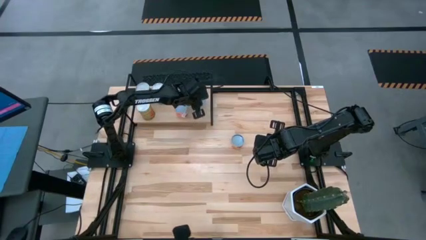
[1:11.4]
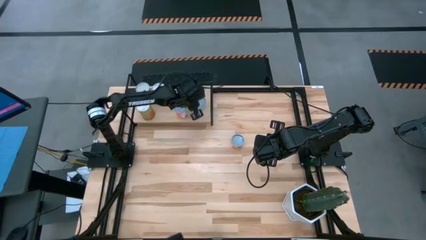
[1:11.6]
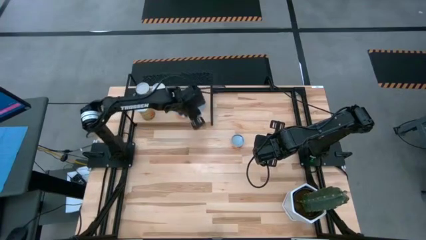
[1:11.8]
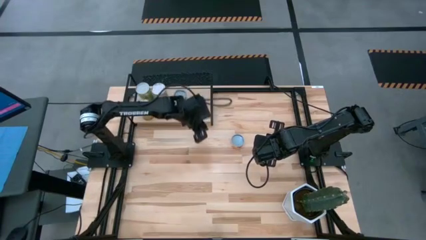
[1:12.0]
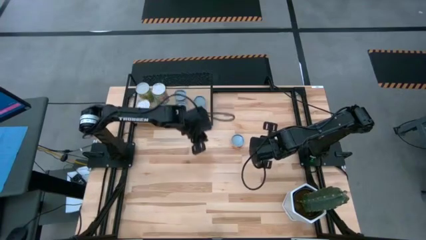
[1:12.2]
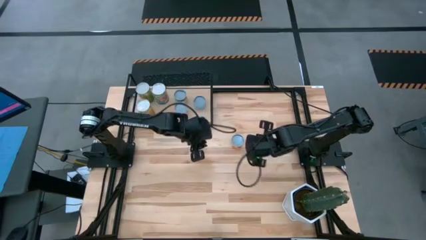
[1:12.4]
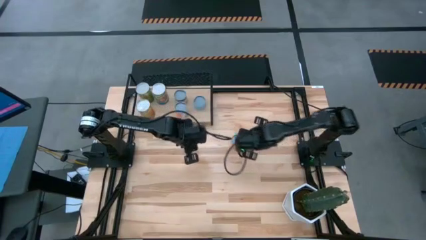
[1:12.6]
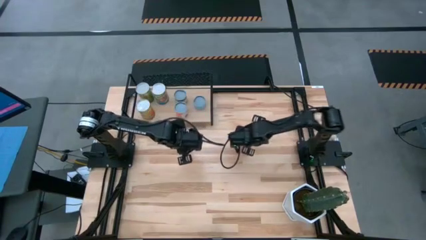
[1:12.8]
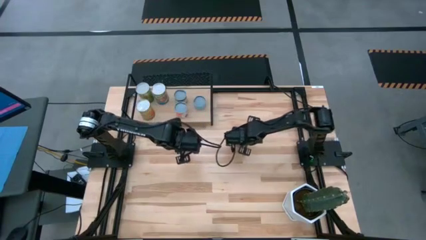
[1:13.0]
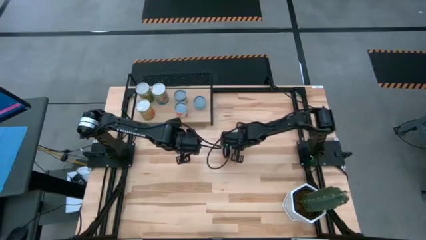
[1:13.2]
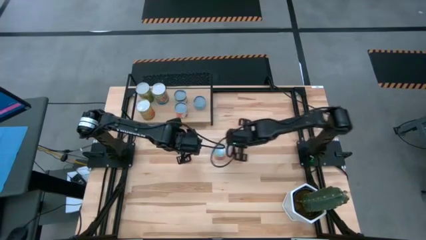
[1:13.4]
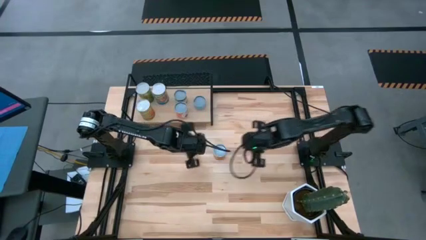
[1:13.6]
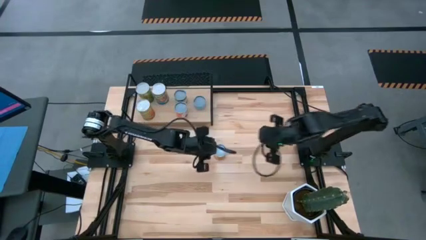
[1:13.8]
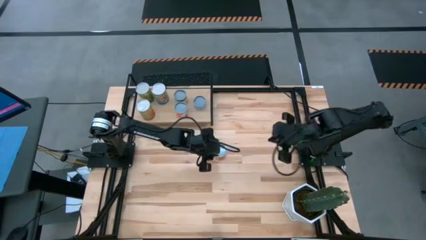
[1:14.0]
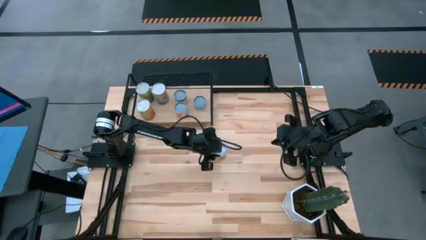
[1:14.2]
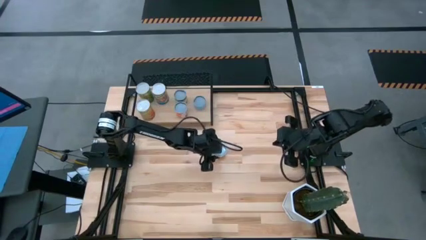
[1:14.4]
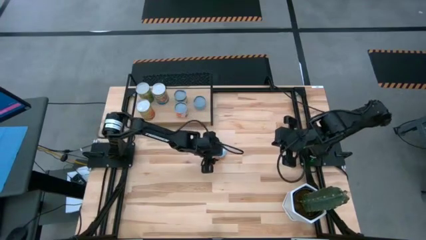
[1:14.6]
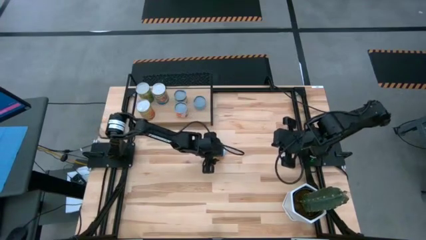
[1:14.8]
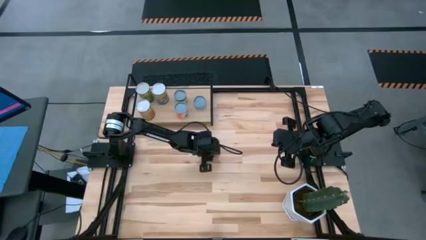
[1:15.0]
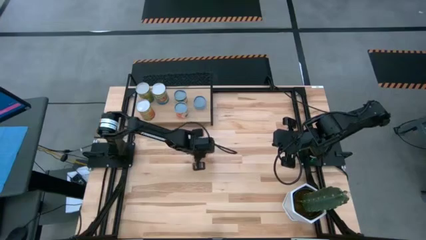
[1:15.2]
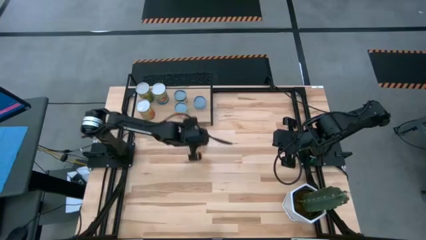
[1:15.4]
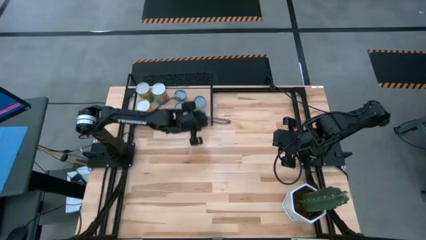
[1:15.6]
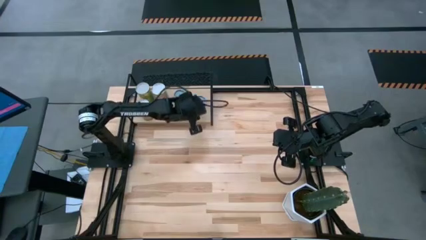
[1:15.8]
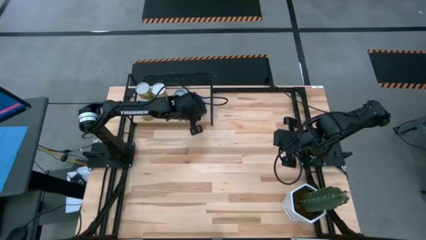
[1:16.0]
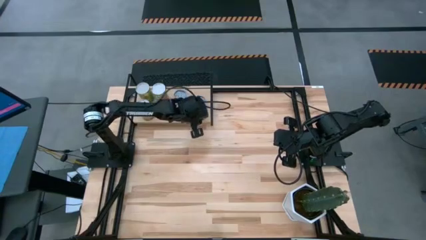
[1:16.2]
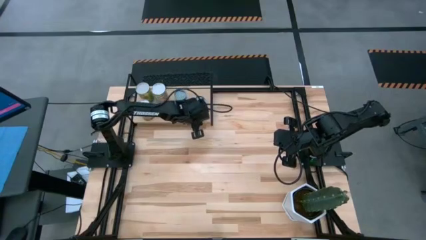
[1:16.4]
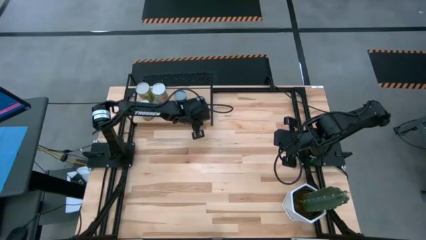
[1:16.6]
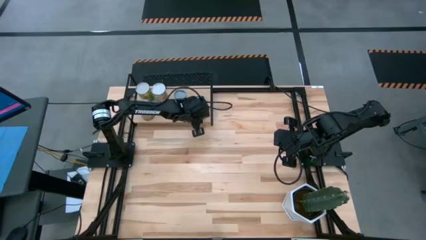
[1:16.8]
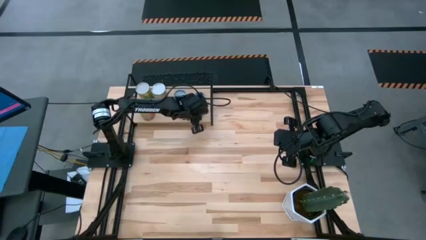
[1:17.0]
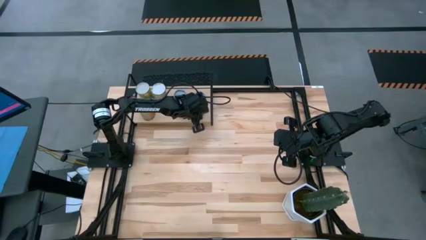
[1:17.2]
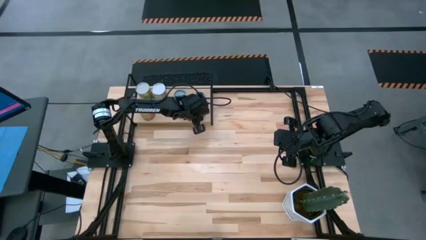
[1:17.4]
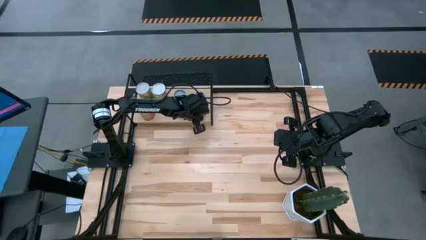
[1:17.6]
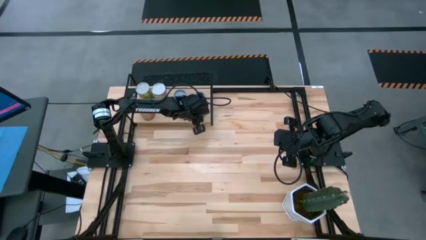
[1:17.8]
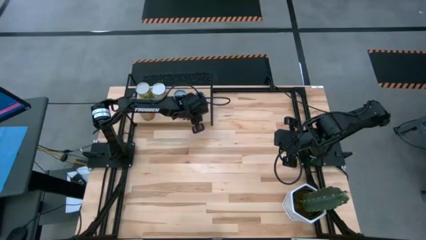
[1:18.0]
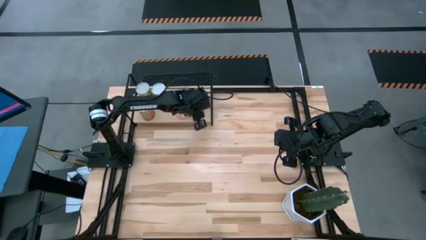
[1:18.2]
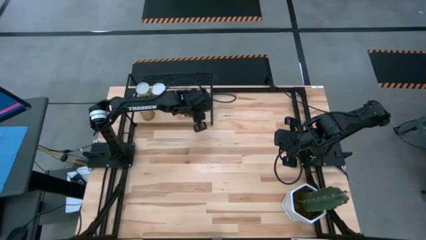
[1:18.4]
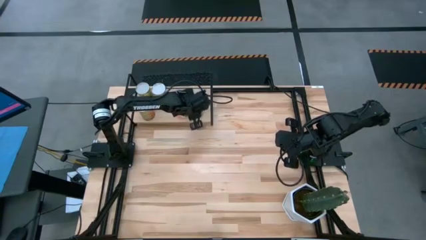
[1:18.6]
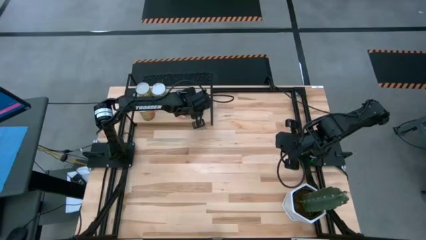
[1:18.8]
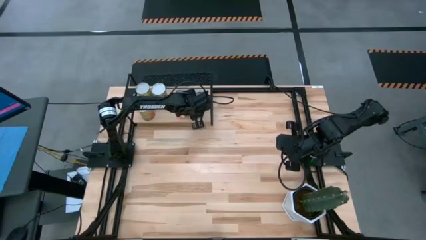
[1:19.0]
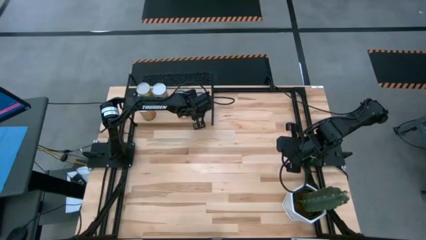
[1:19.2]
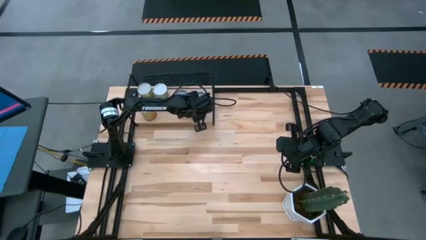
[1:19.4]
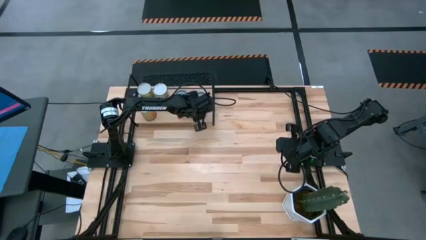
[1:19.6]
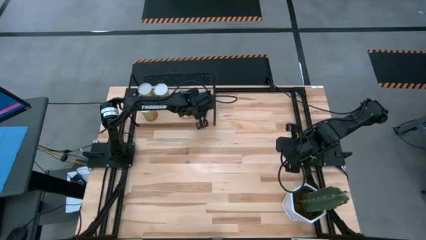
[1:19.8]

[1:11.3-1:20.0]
Task: Pick and place cans onto a shelf
Put the canned pineapple on the shelf

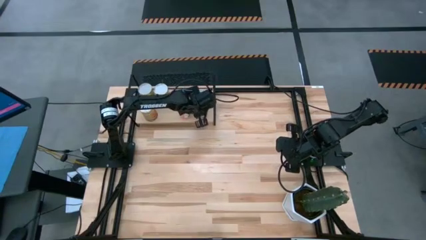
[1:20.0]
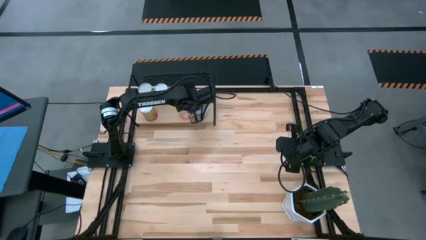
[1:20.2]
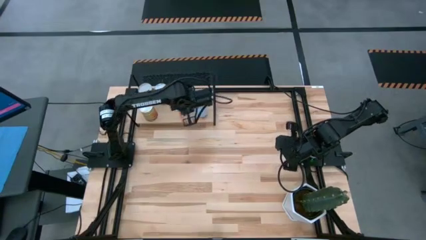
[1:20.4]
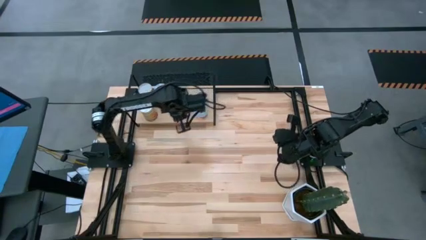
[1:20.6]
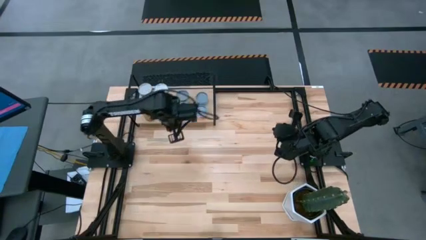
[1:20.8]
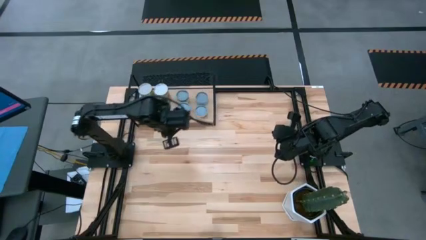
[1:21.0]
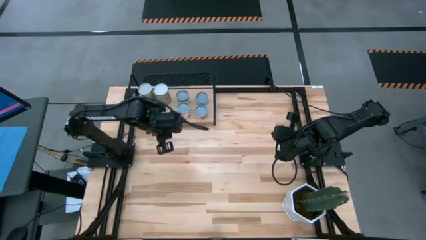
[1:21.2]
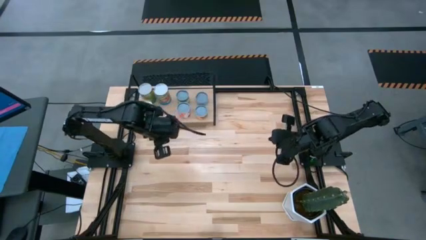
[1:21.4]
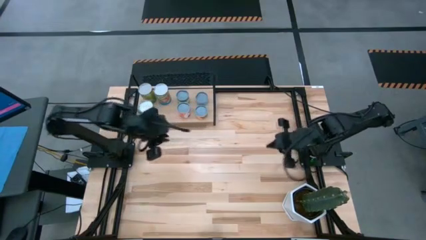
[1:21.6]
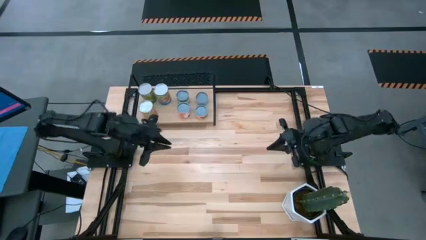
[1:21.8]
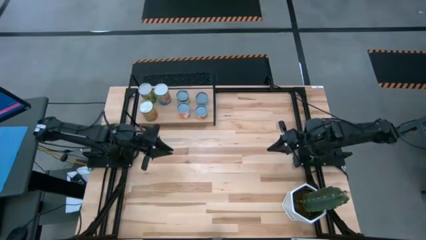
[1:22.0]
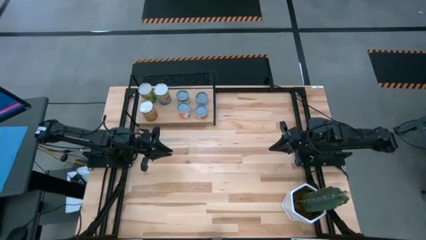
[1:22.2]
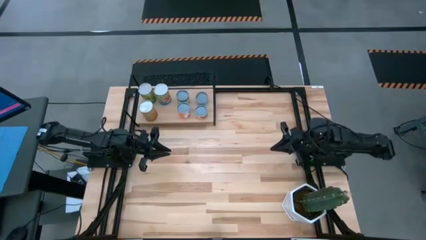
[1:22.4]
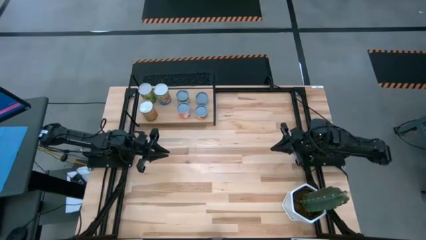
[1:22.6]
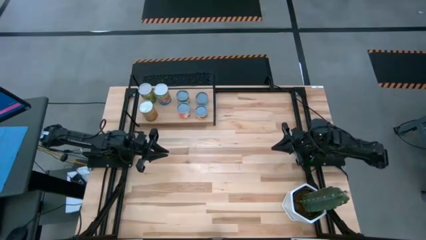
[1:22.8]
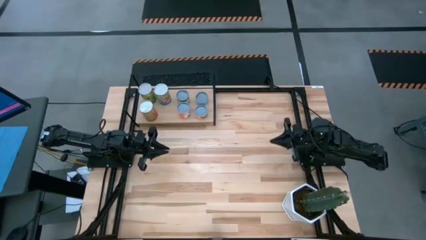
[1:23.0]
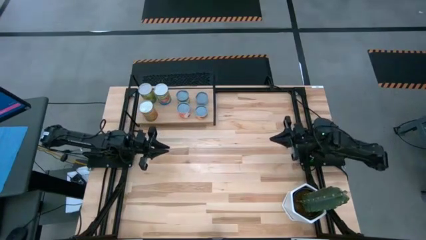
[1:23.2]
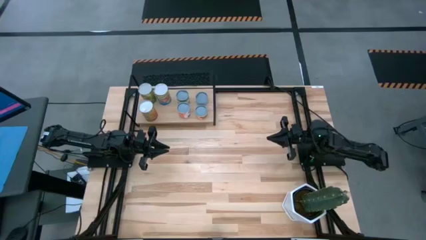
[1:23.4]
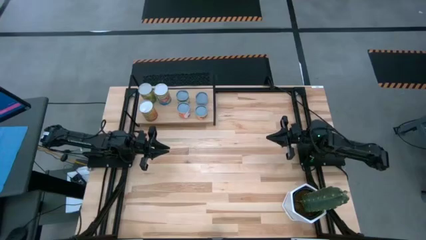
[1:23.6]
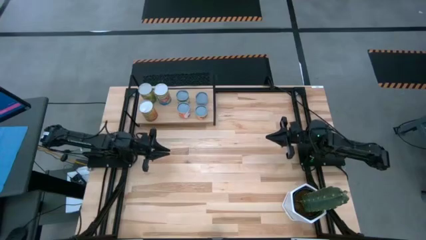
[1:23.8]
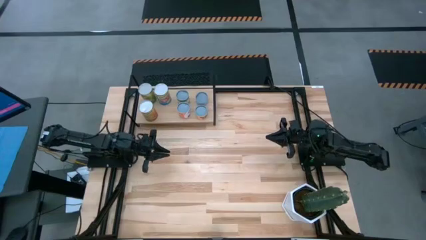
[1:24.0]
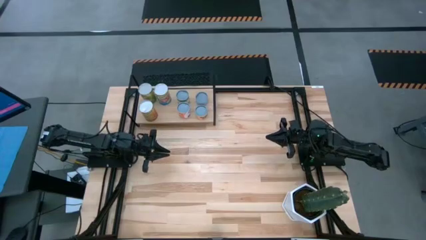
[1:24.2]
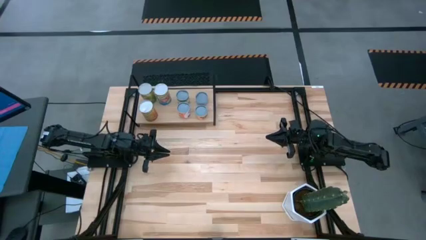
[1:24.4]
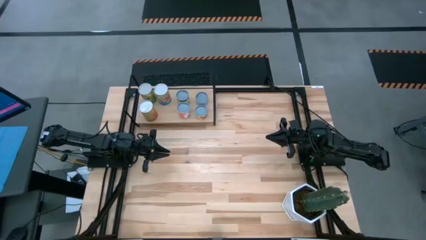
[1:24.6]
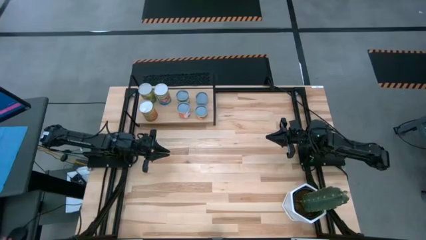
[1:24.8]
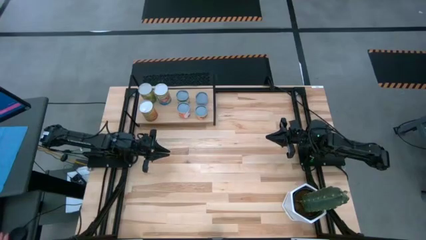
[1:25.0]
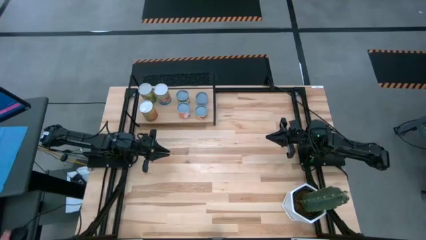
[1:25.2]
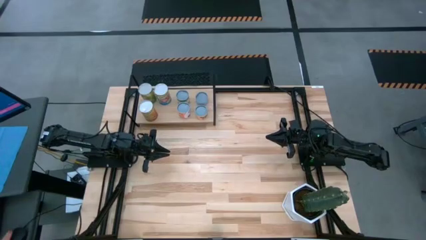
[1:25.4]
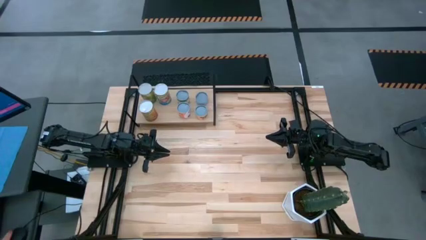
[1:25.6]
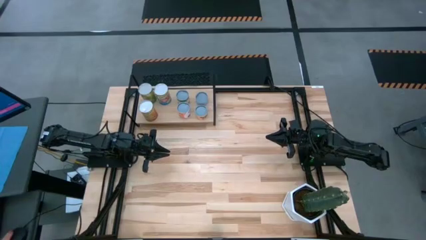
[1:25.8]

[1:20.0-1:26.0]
Return to Home Position
